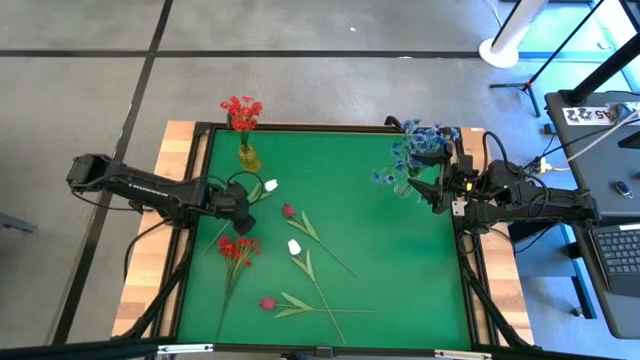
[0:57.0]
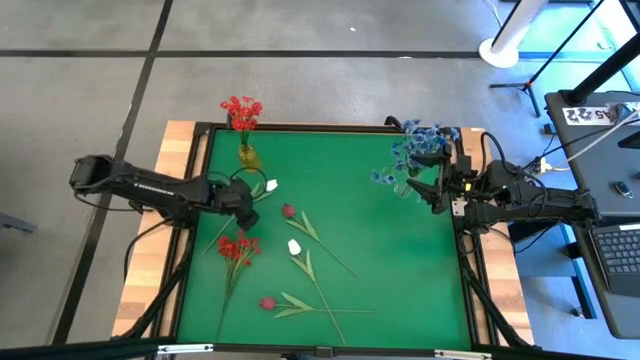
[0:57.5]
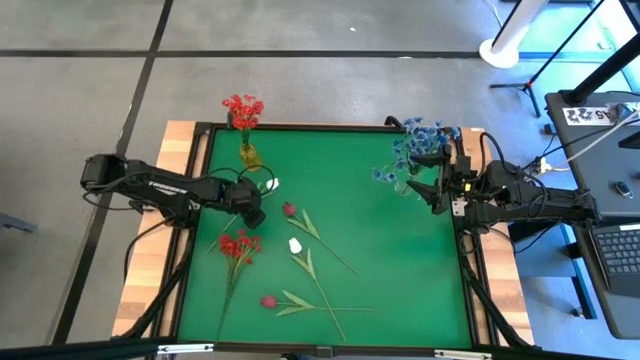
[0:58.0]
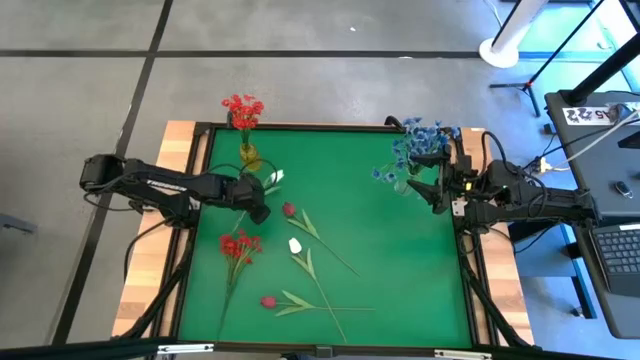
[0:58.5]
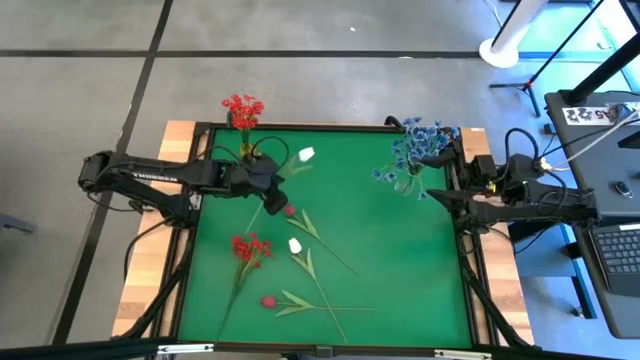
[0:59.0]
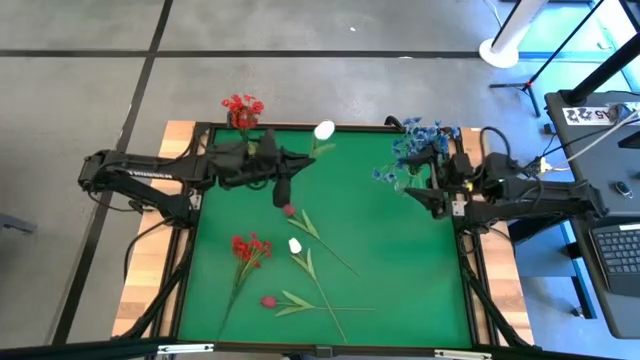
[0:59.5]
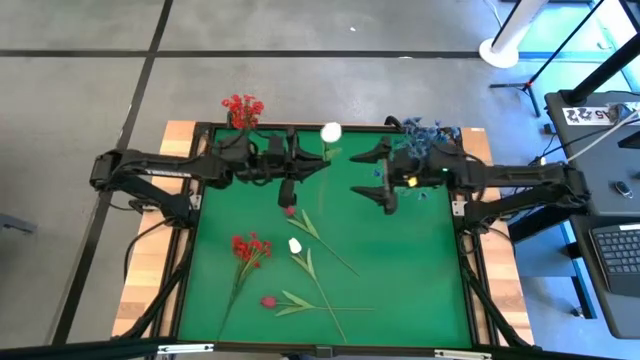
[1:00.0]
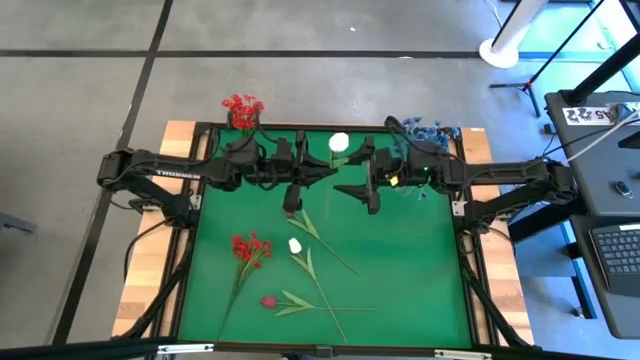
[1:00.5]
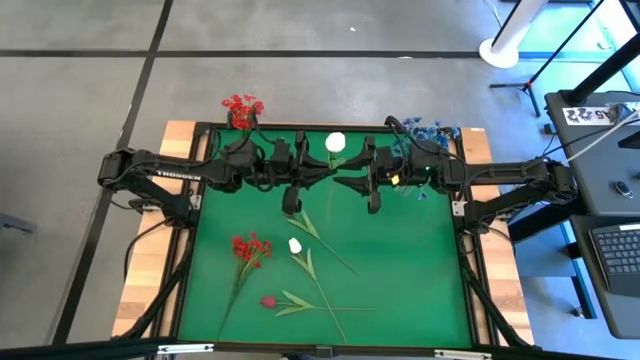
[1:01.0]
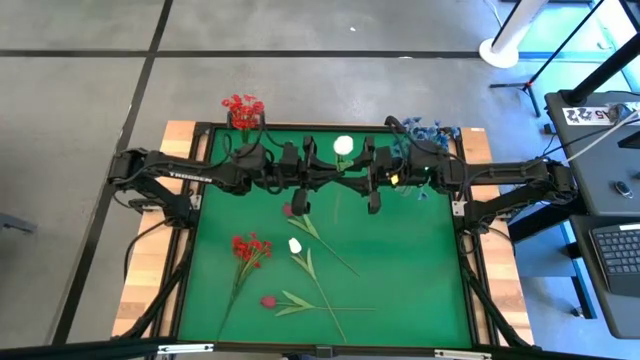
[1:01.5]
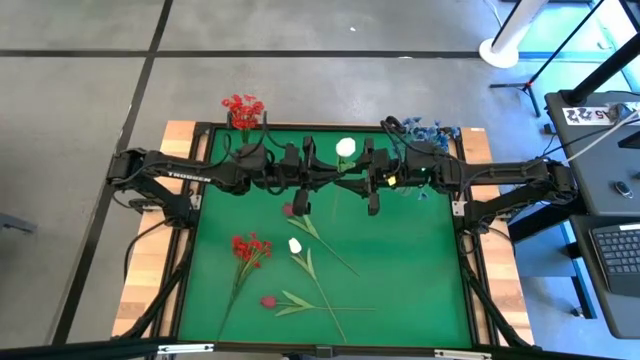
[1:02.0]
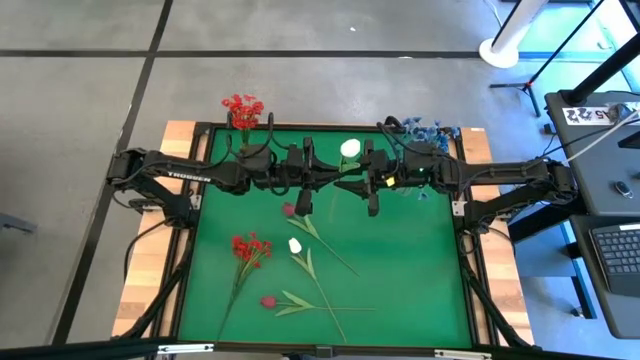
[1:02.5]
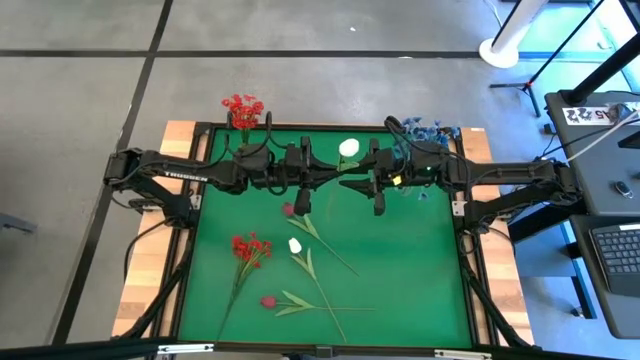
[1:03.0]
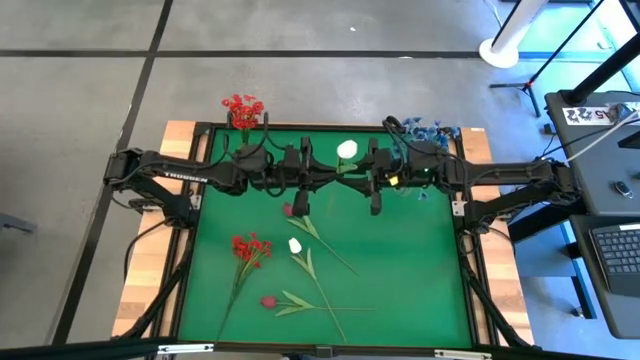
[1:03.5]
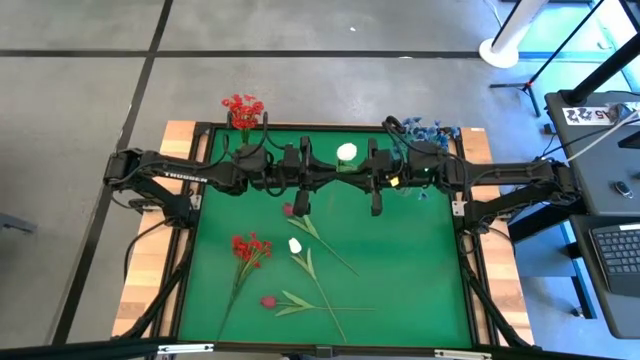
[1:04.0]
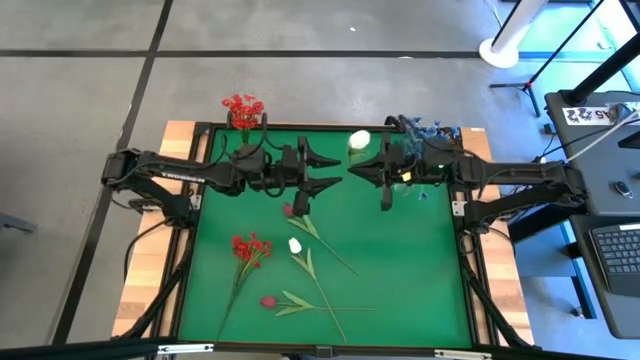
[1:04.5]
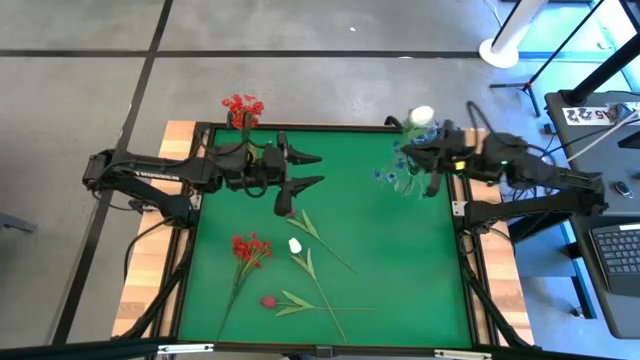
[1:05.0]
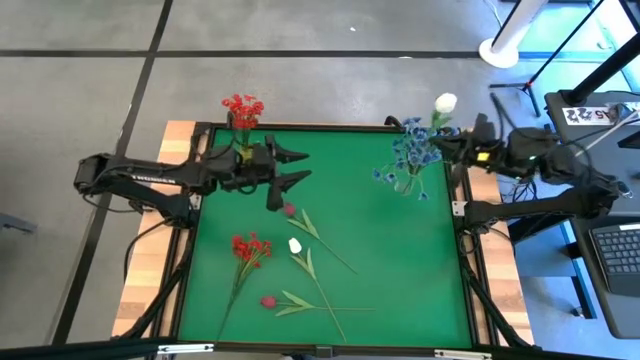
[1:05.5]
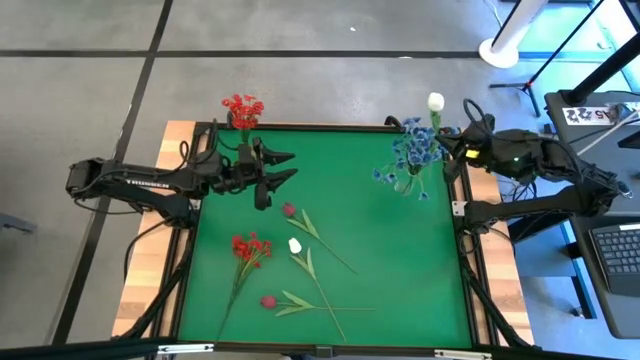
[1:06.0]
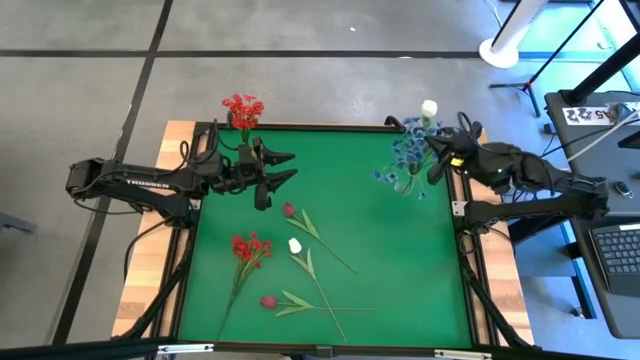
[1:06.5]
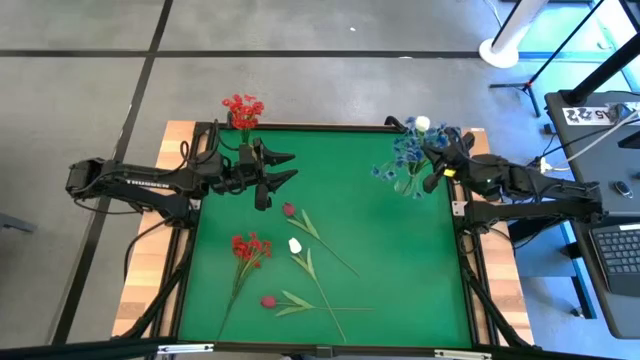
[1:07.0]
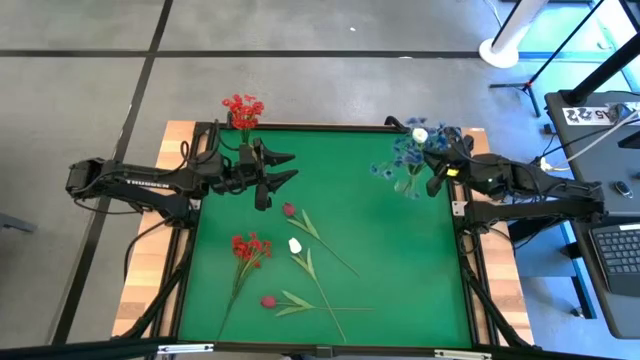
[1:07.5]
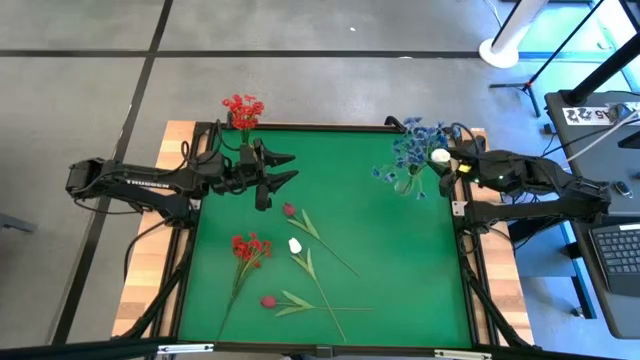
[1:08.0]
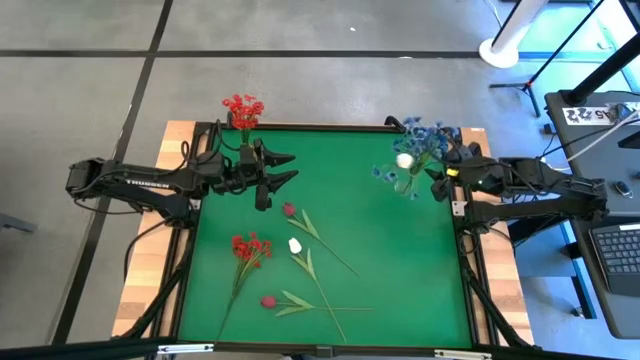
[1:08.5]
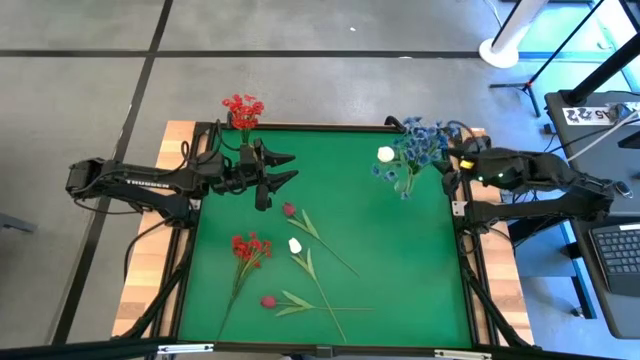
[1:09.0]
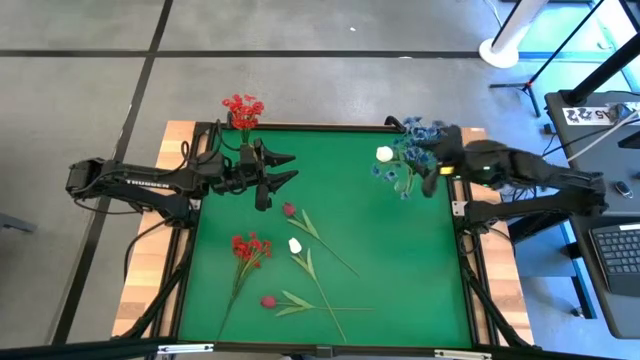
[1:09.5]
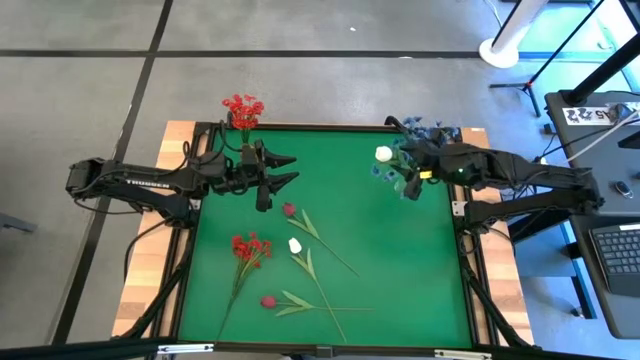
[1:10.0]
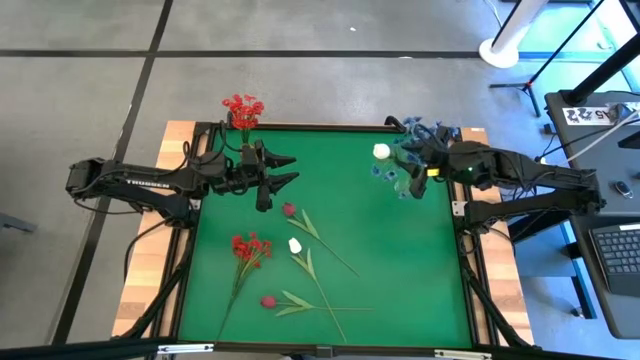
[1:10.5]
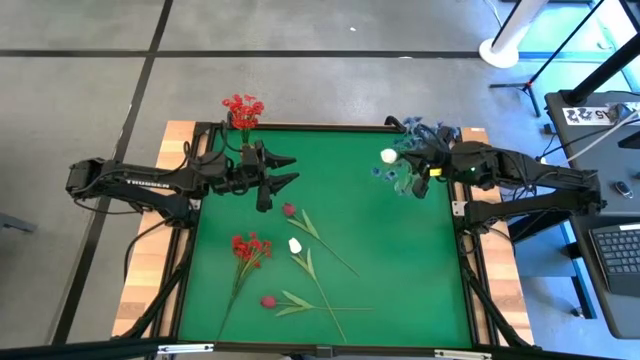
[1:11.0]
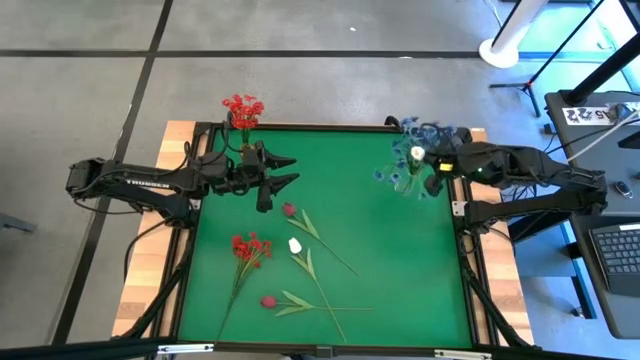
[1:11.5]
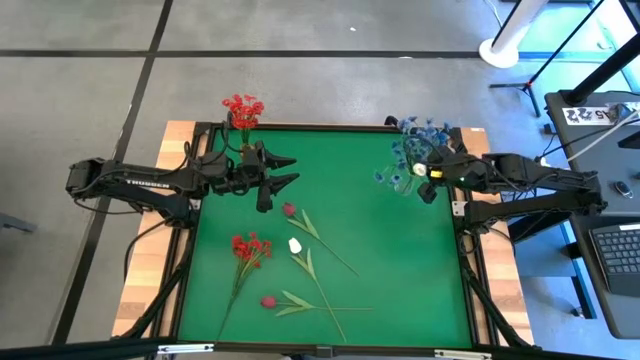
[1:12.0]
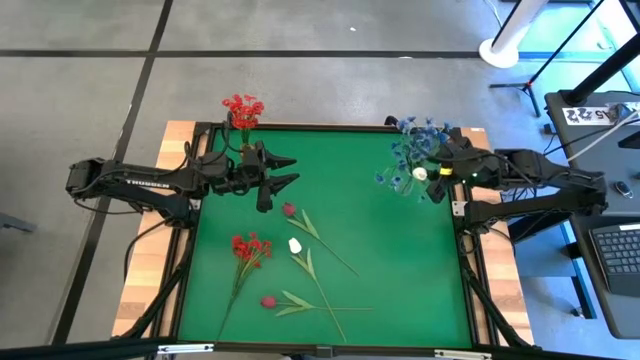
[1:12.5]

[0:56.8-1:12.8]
Task: Sort flowers into vase by color
Put the top white flower into the transparent vase

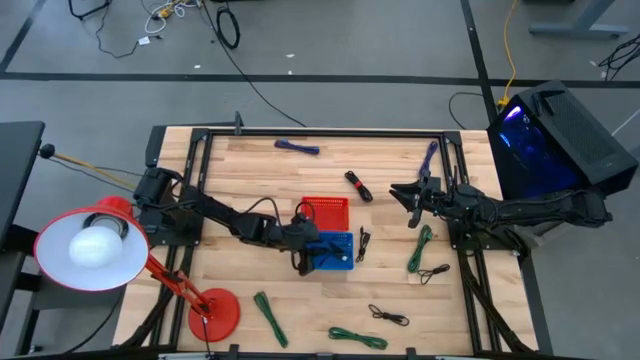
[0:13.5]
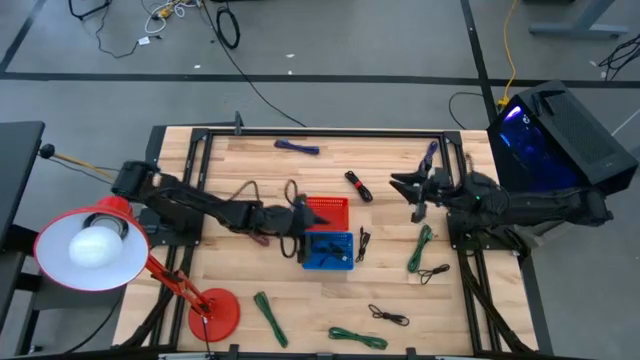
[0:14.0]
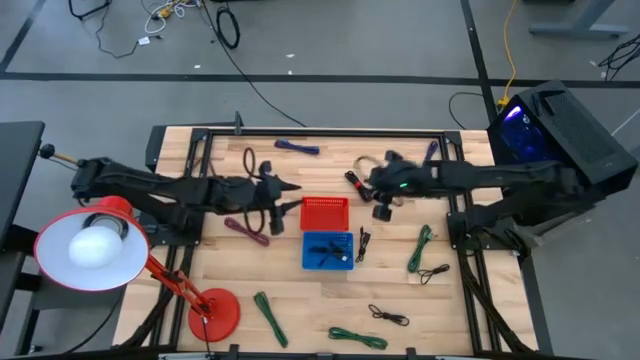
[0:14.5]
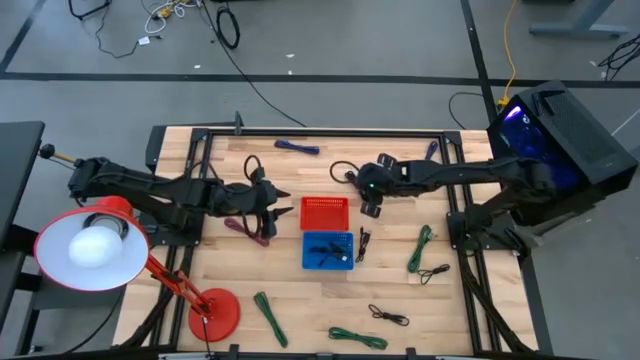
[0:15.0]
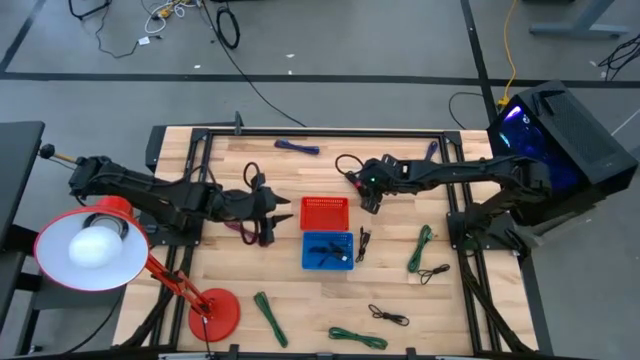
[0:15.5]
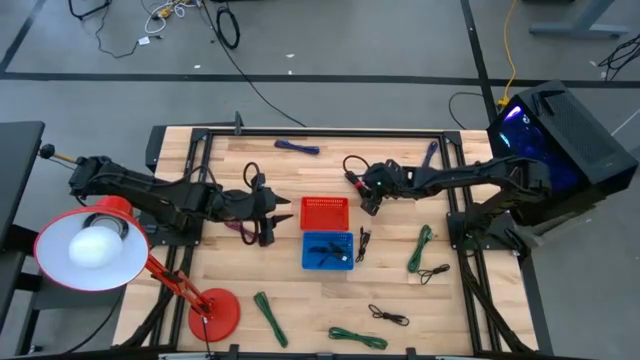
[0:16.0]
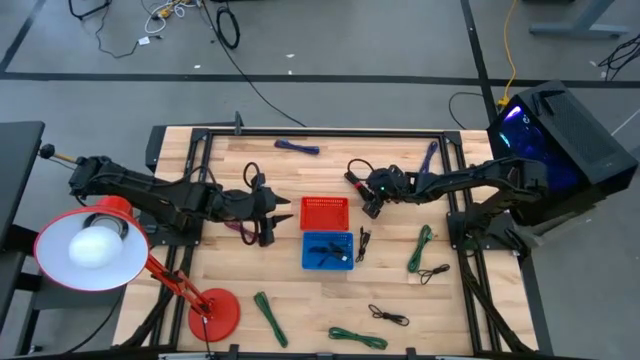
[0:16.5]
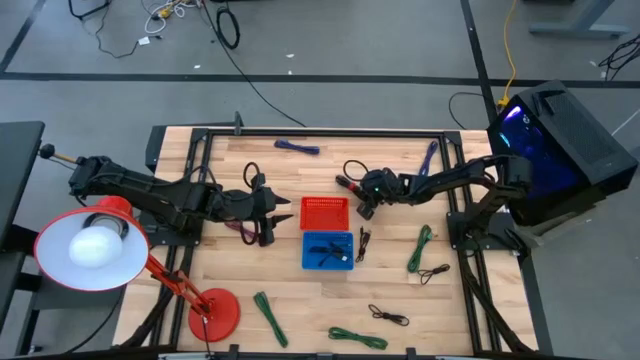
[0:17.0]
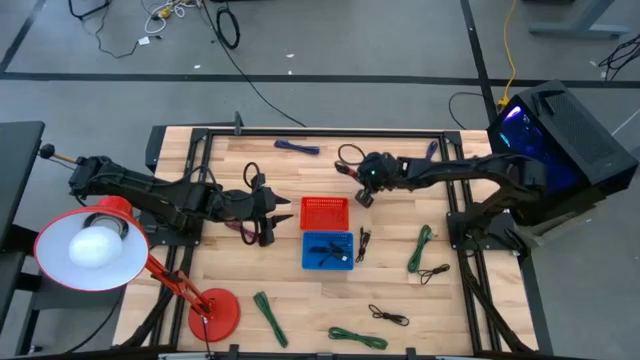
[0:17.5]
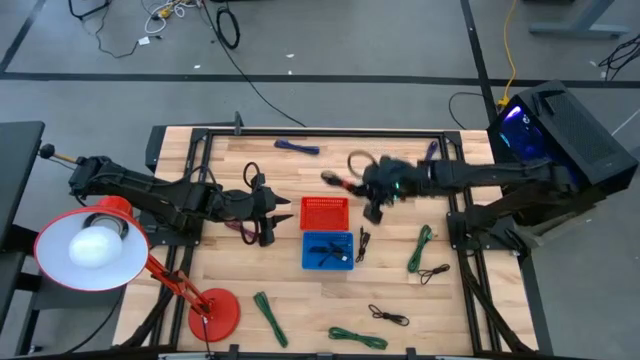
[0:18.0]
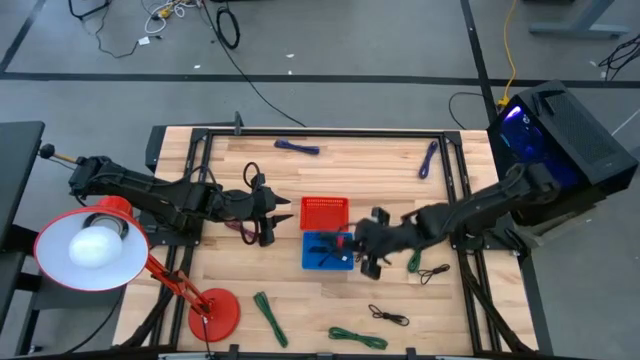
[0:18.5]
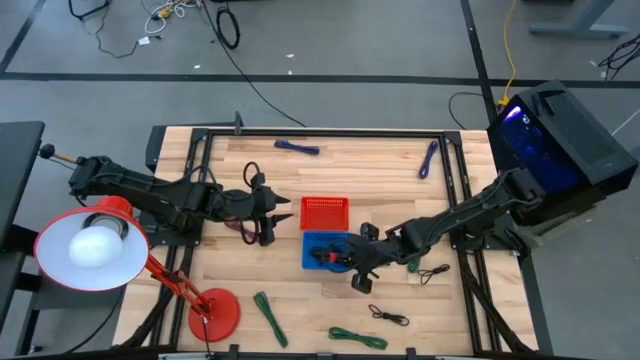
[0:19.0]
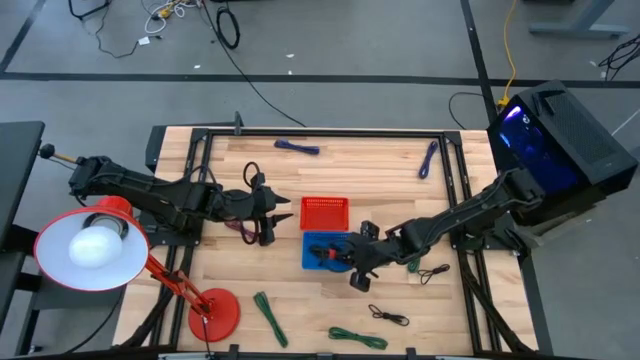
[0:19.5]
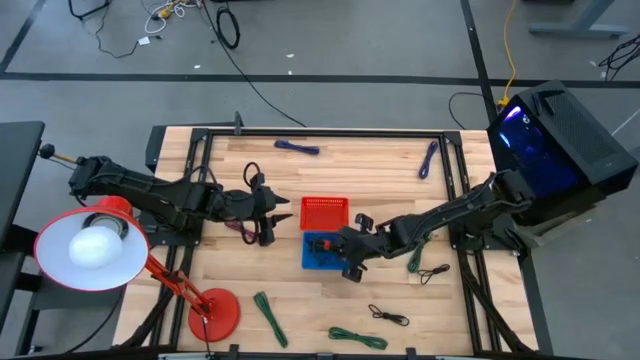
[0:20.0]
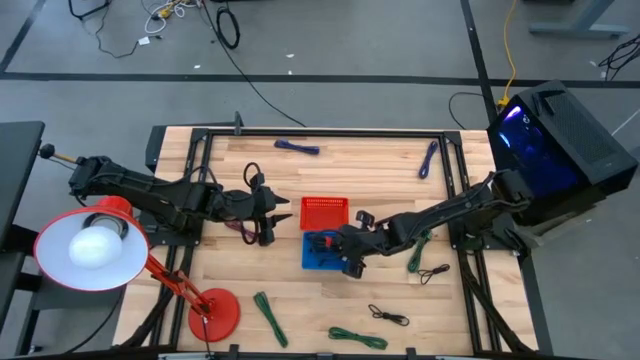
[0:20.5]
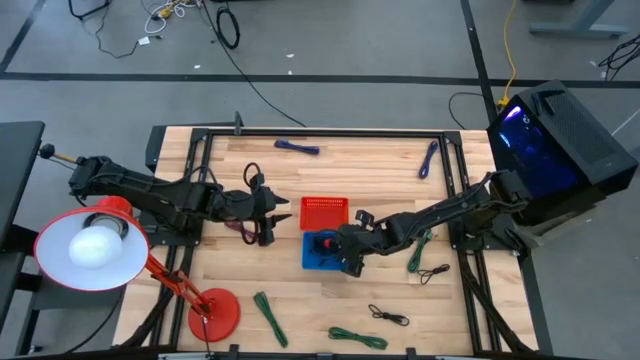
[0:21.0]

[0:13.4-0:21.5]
Task: Pick & Place USB Port
Put the black charger cable into the blue bin
